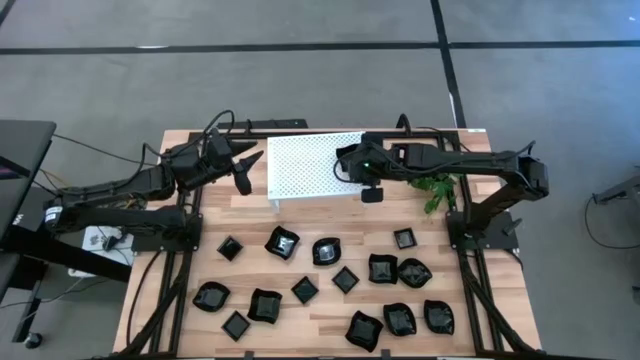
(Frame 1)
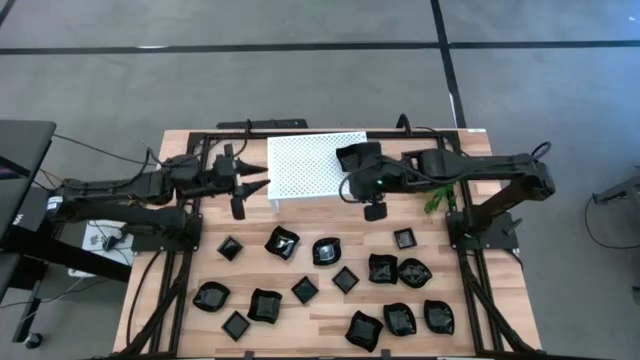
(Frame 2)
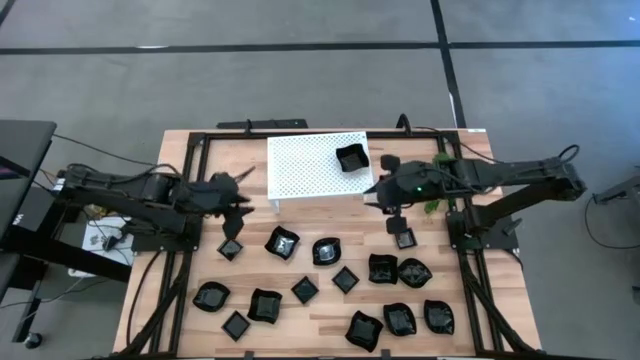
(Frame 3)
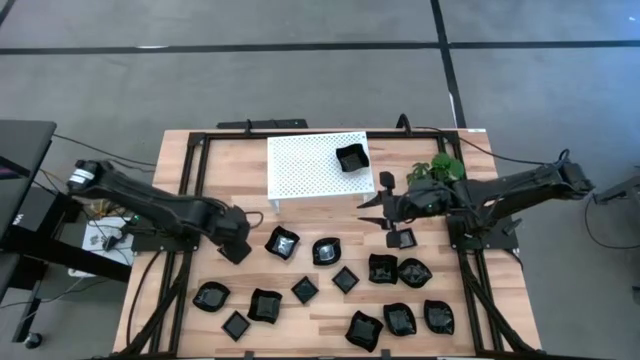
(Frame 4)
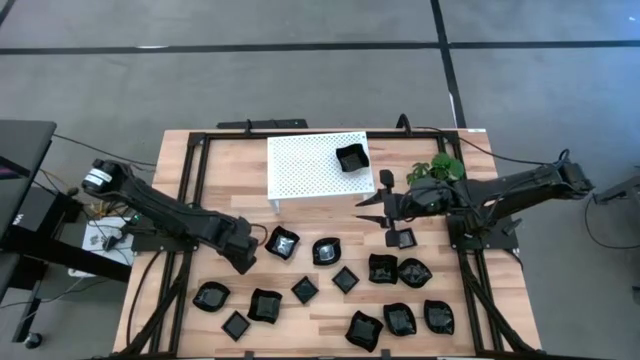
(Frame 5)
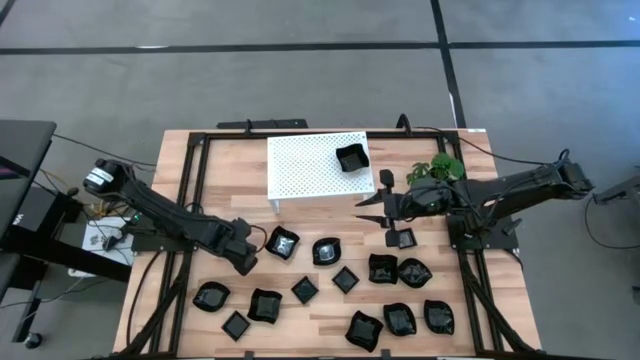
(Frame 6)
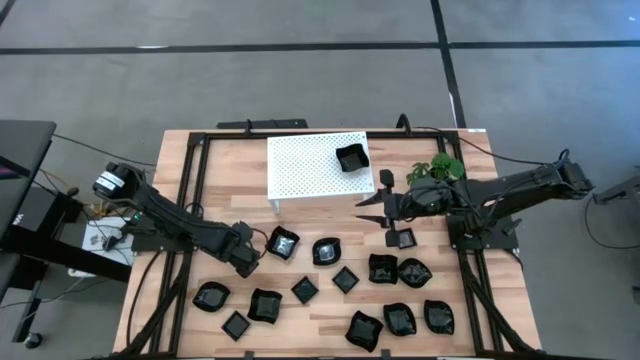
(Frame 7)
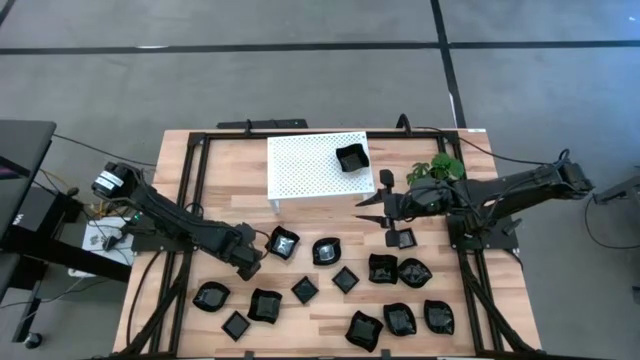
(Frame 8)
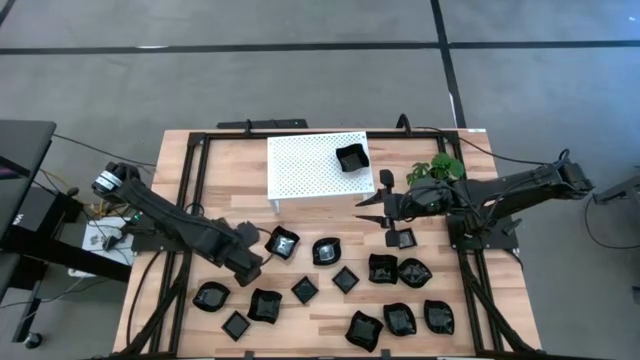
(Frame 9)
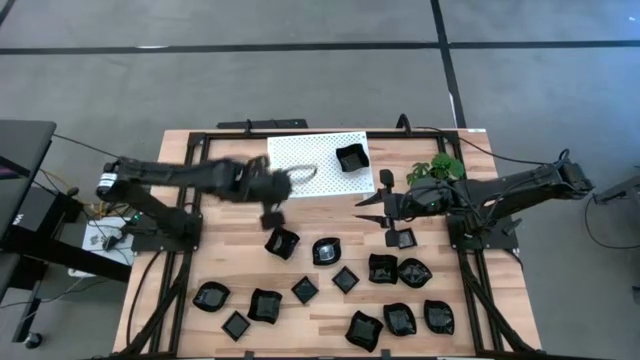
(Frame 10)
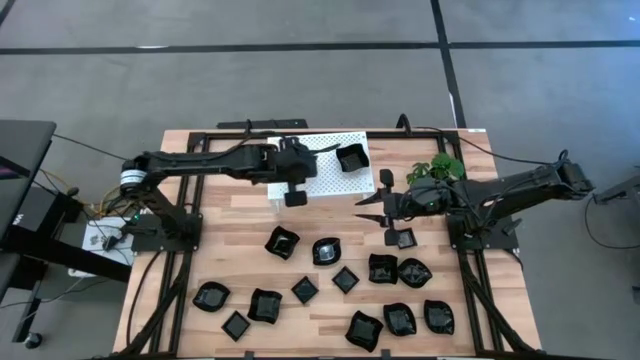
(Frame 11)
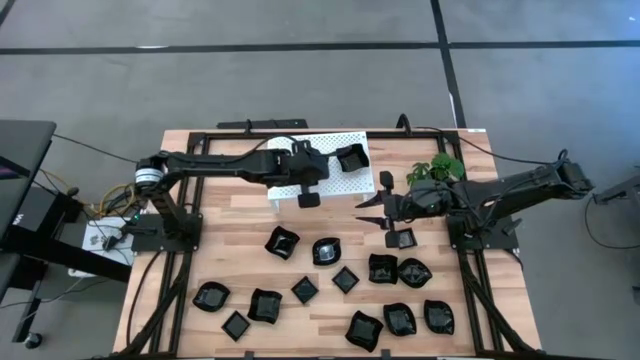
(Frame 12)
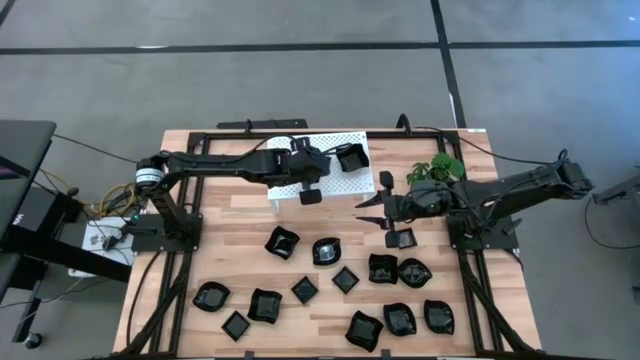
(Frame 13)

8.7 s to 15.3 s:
Task: Pick & Place Mini shaped plates
Put the square plate on the shelf

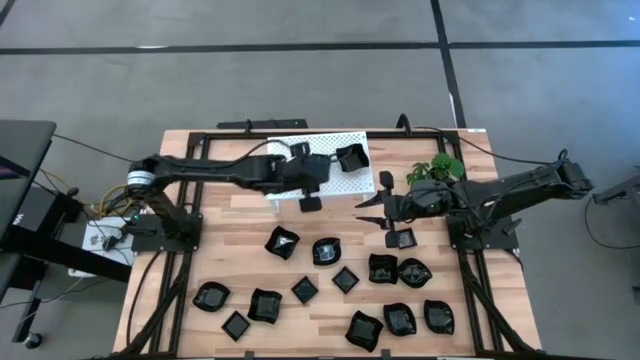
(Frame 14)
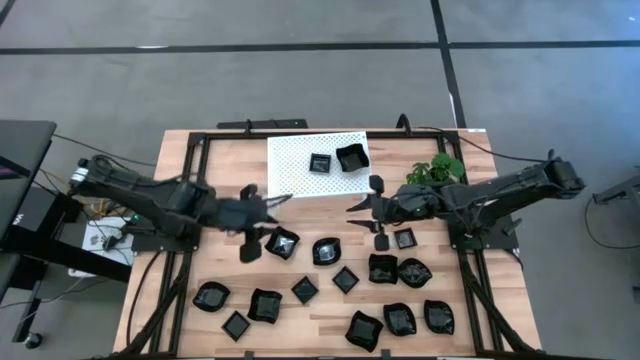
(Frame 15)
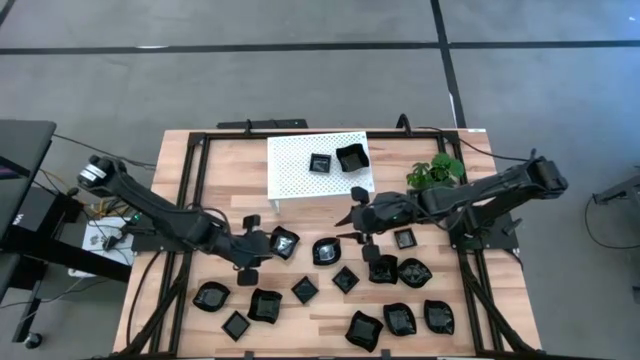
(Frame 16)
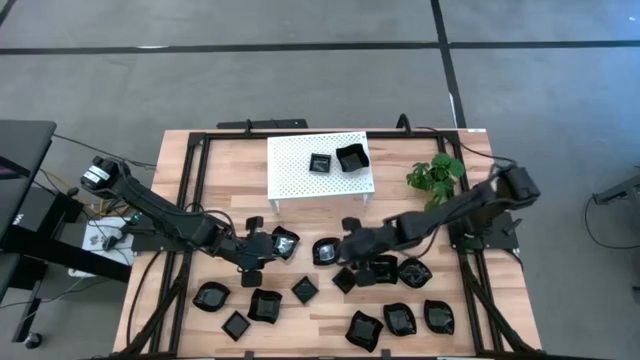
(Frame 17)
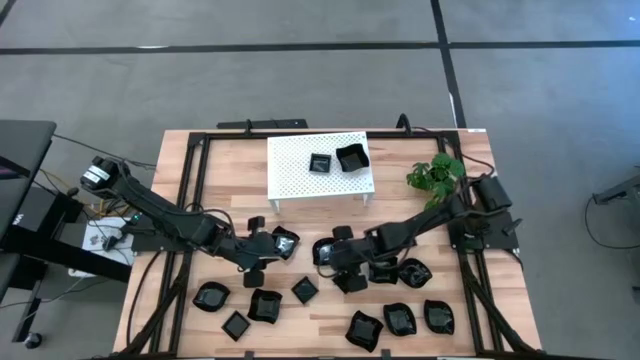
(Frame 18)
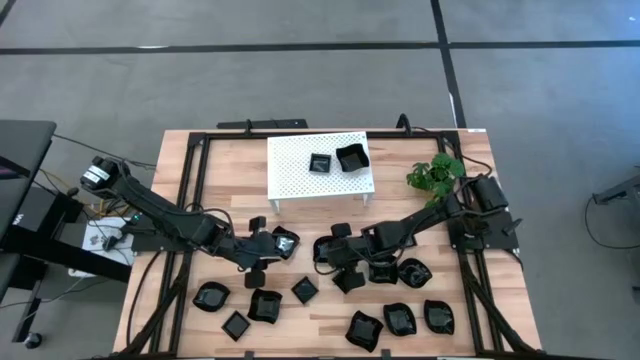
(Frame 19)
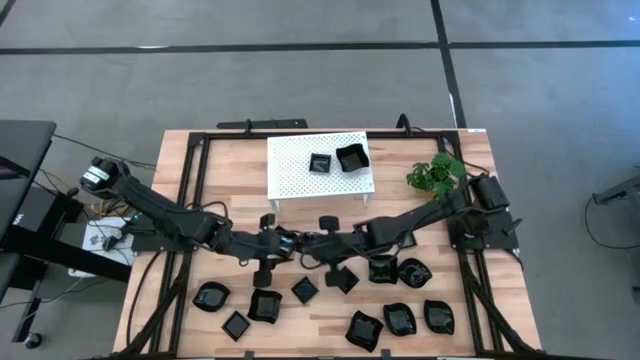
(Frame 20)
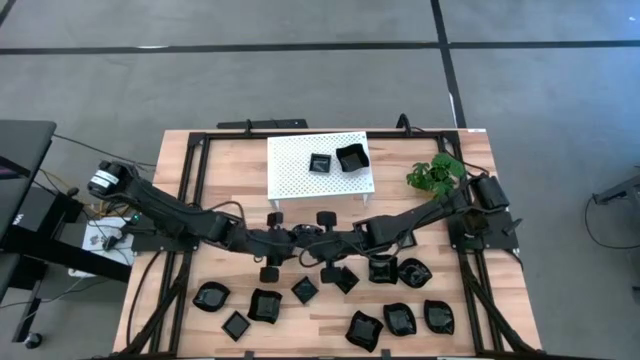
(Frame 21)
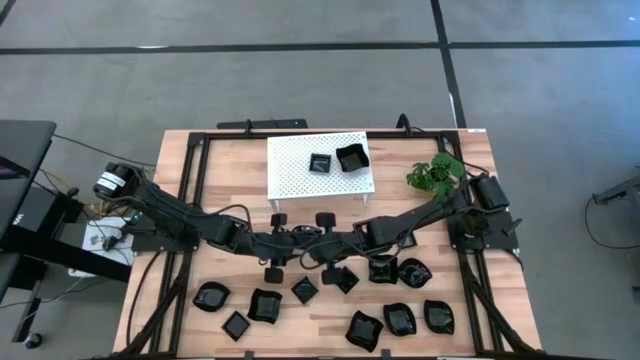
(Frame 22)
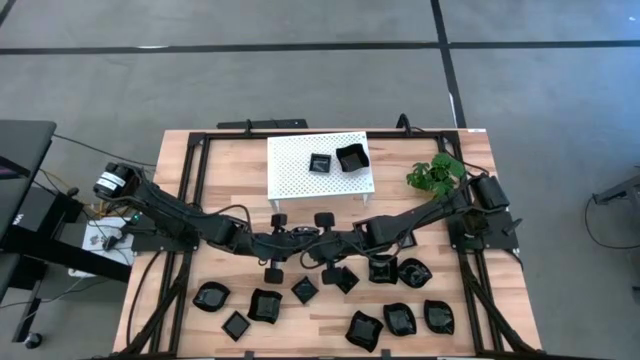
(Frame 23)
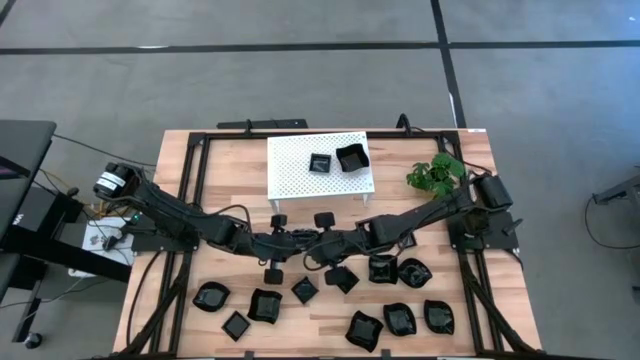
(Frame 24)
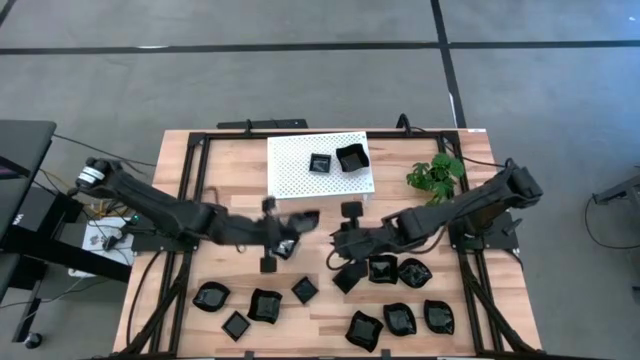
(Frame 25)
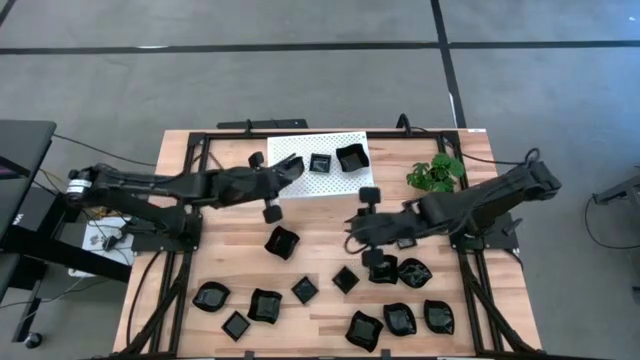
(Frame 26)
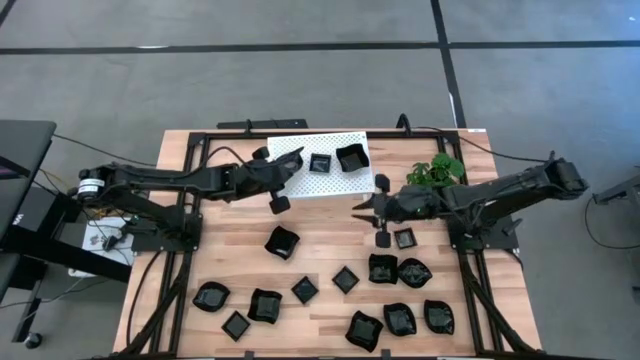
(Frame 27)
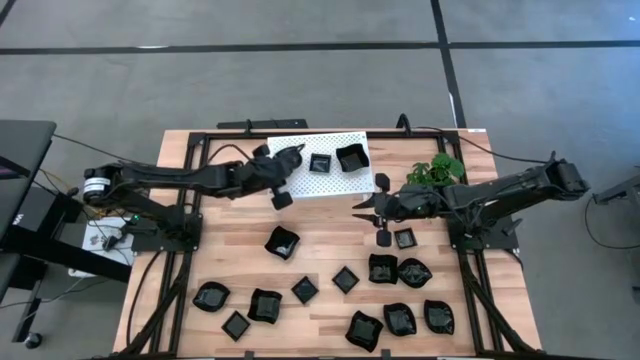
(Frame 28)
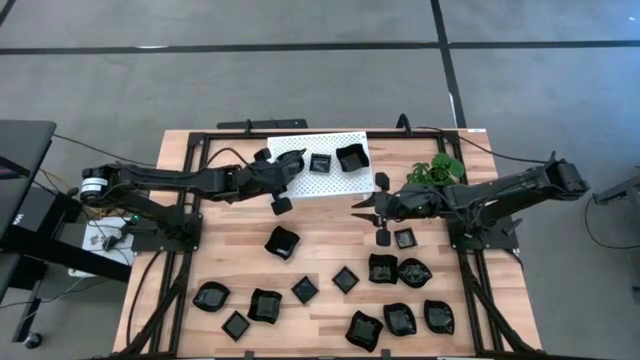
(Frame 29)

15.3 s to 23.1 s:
Put the leaf-shaped plate on the shelf

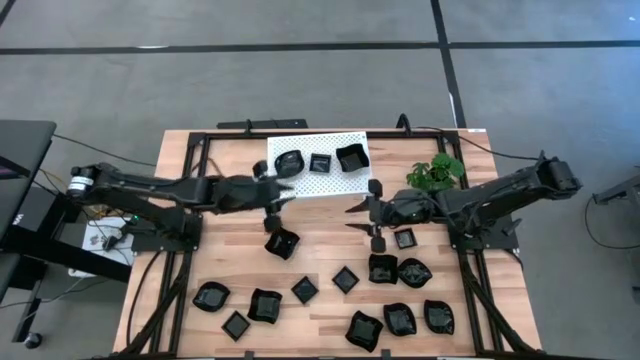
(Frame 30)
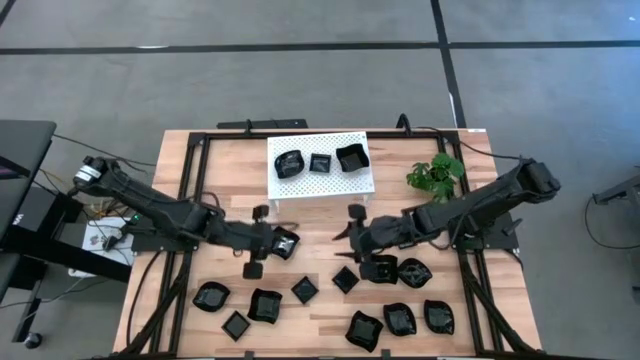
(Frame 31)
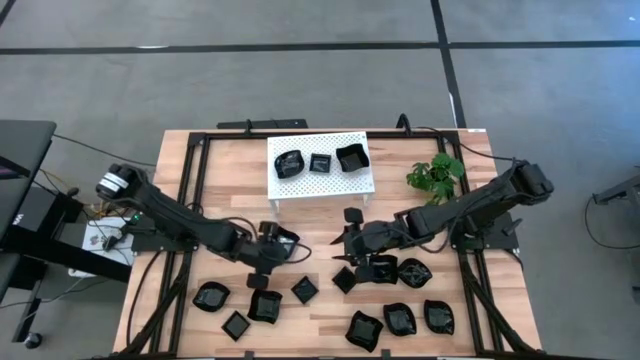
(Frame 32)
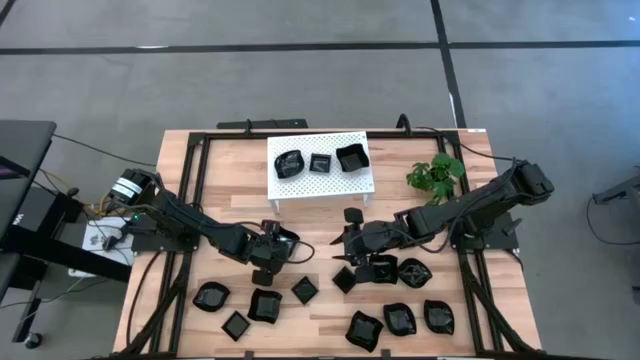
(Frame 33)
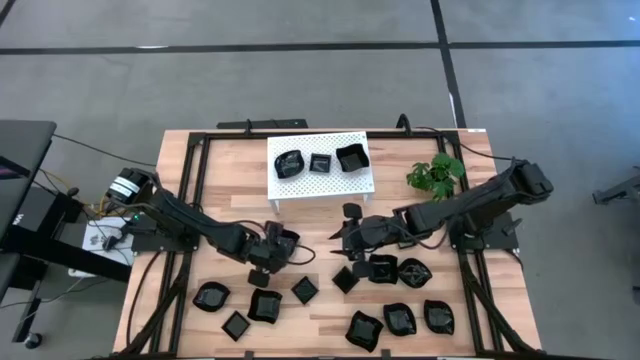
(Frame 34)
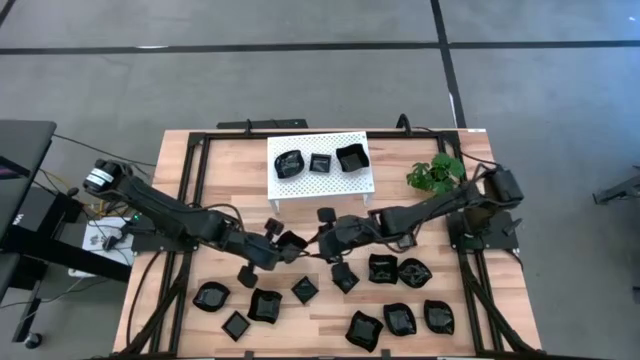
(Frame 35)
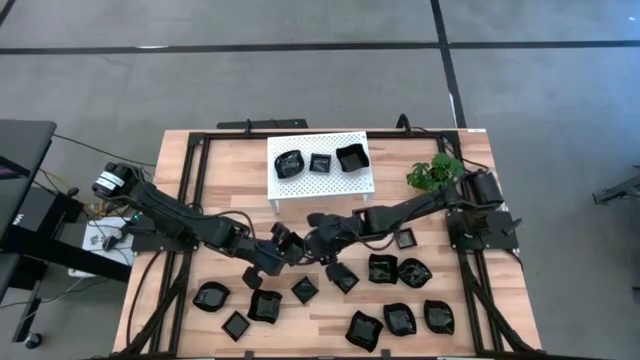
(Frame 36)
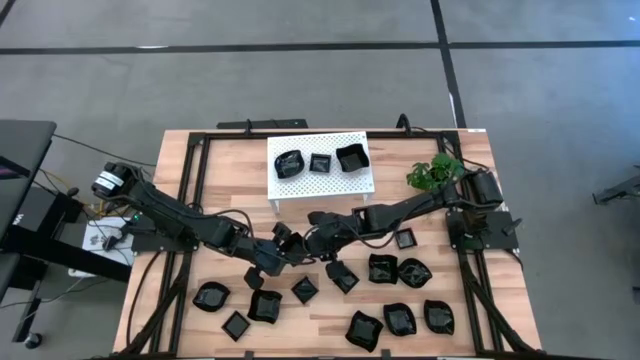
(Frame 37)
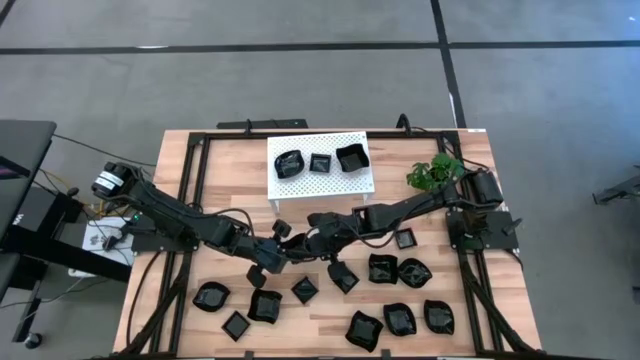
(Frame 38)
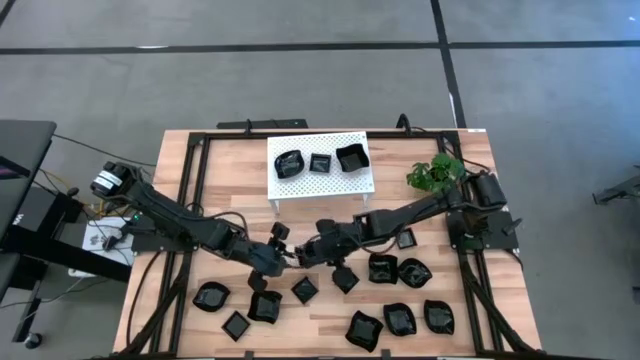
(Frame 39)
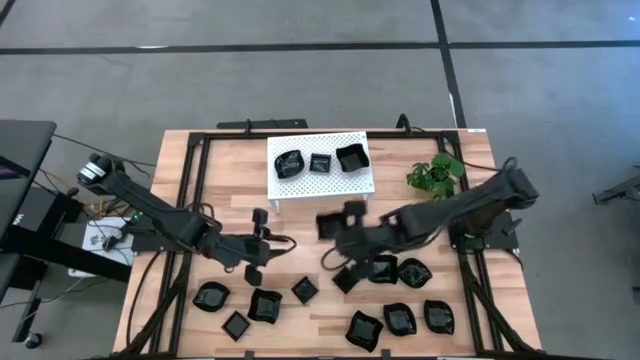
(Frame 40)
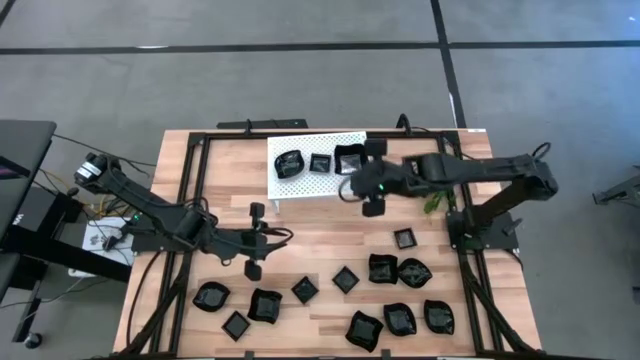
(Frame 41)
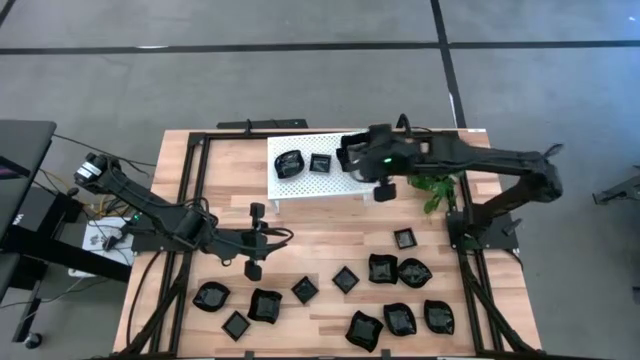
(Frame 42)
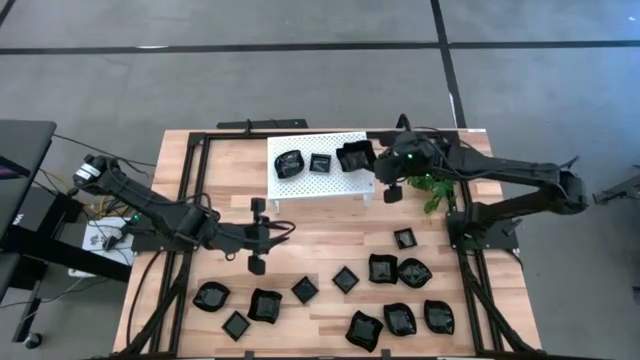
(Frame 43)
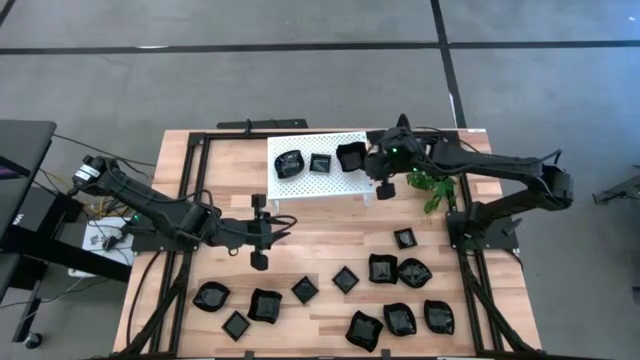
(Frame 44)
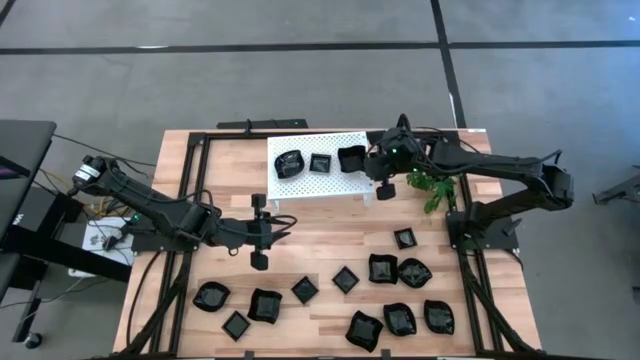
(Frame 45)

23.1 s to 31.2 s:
Stack the distorted square plate on top of the distorted square plate on the shelf
